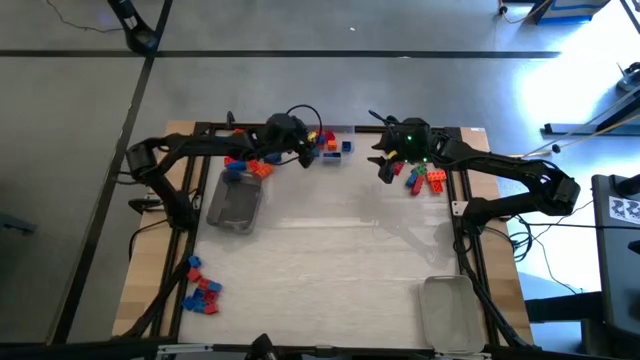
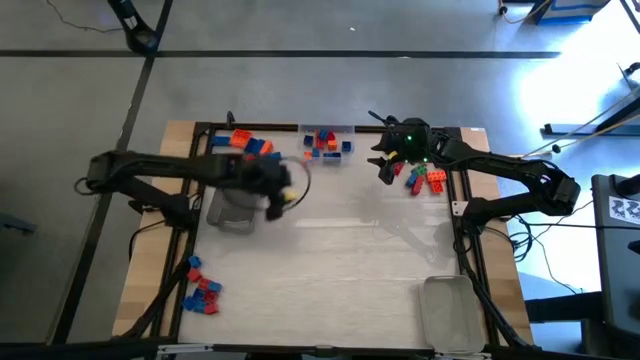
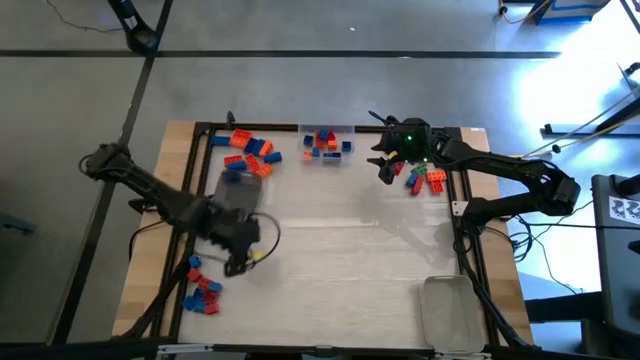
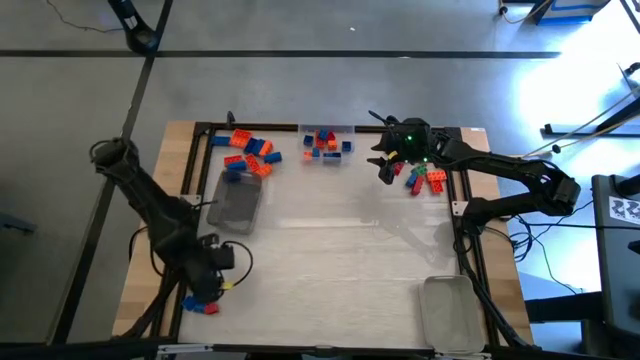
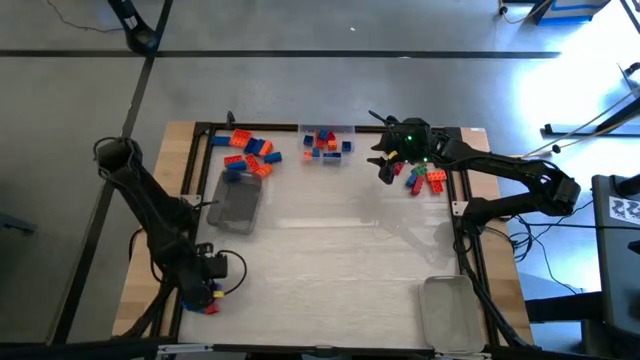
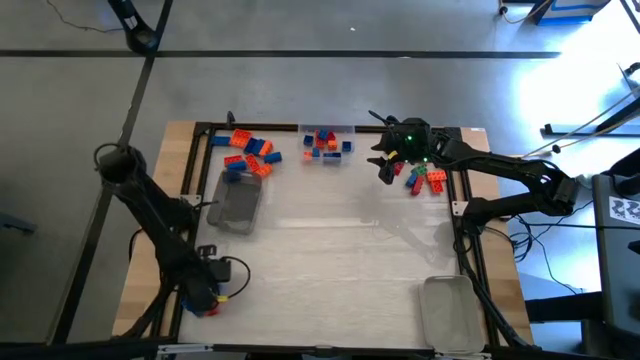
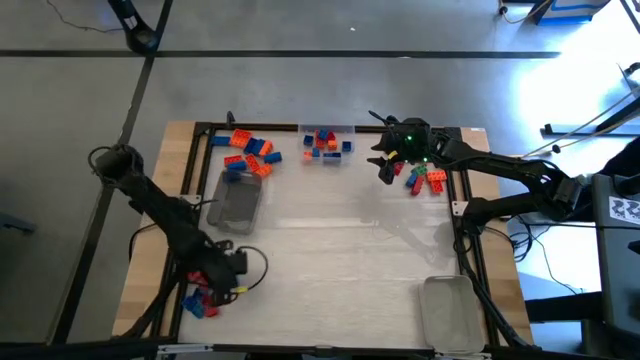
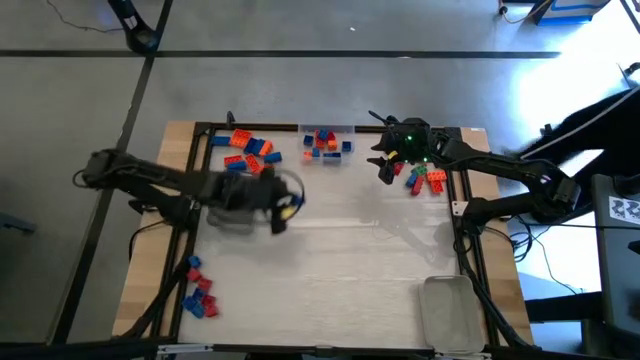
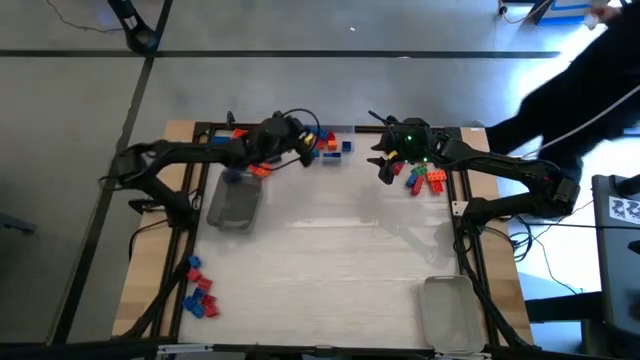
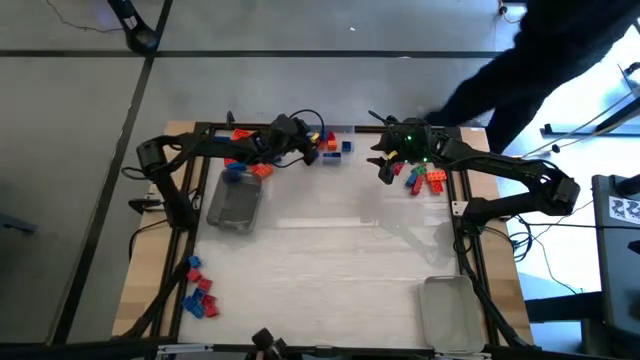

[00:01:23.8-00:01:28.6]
Task: Sort blocks by size
Put the blue 4 stud game piece into the transparent bin

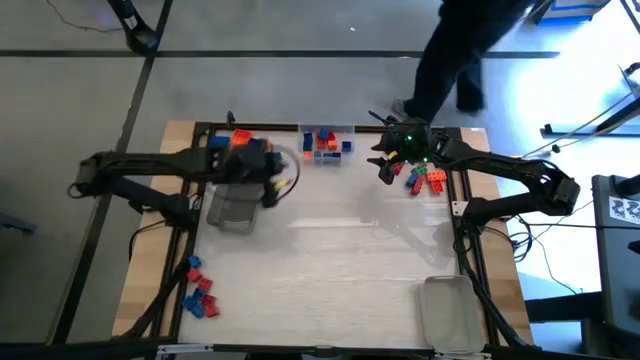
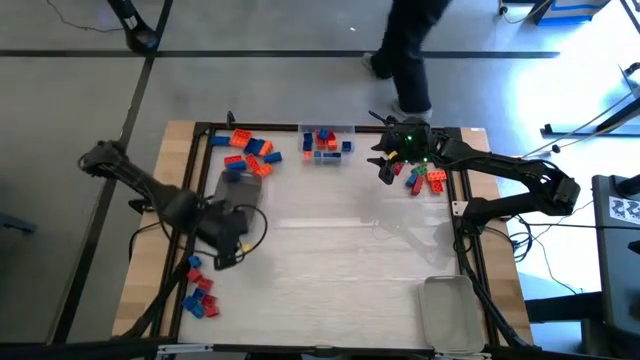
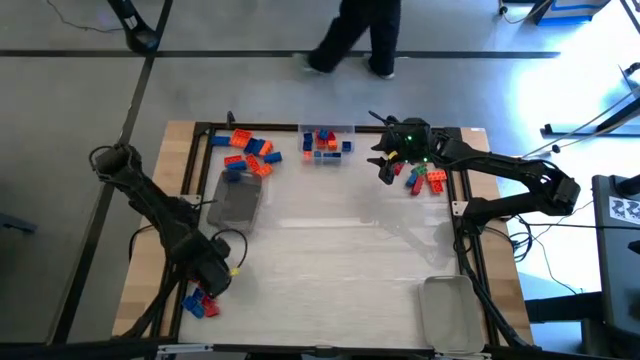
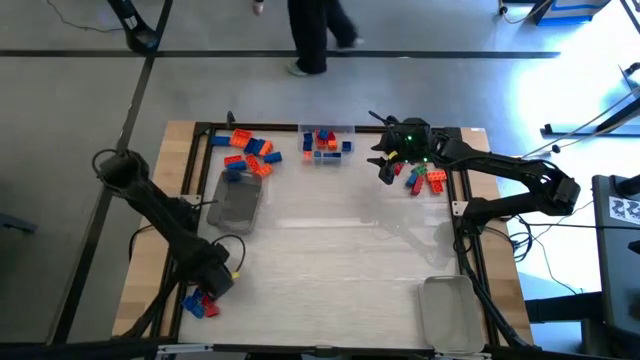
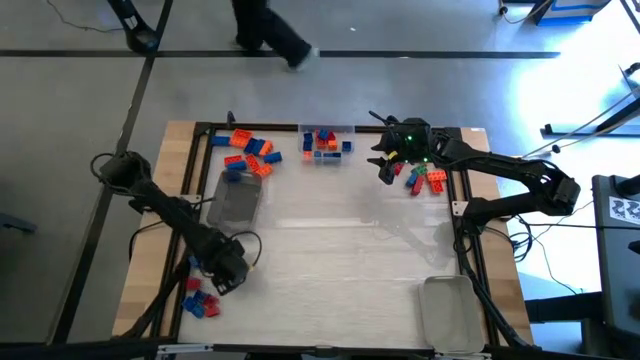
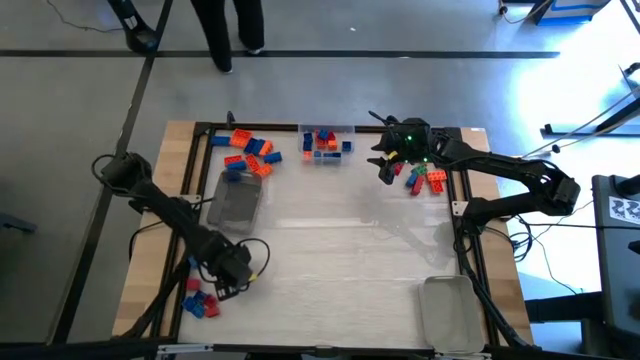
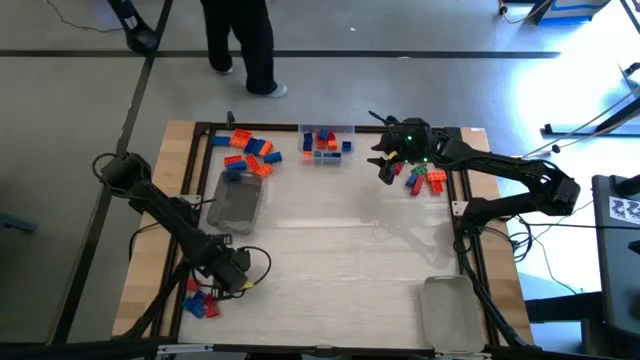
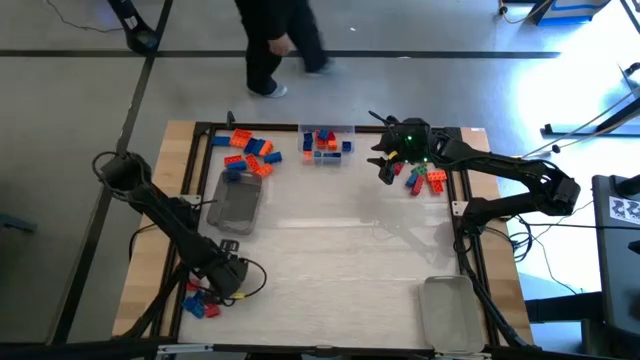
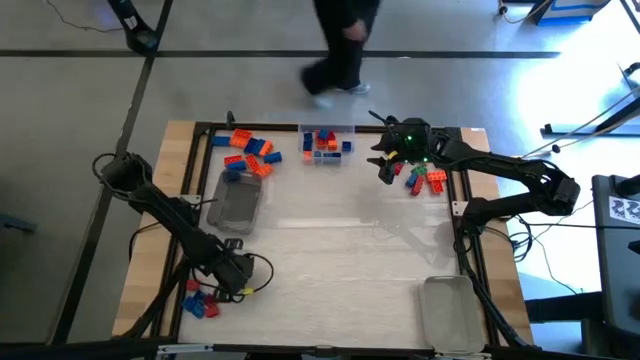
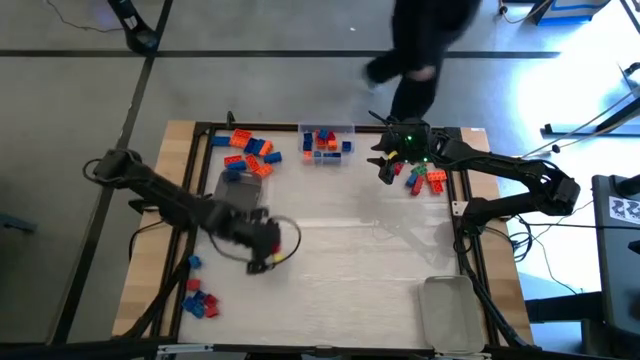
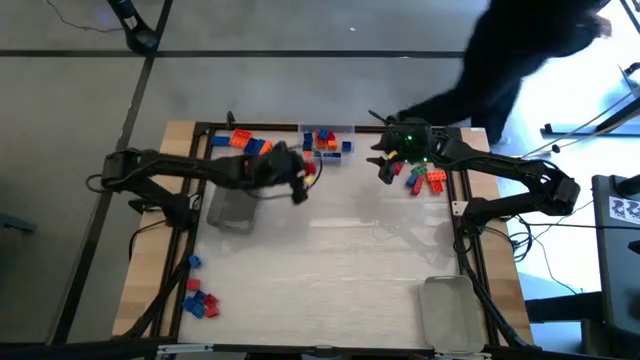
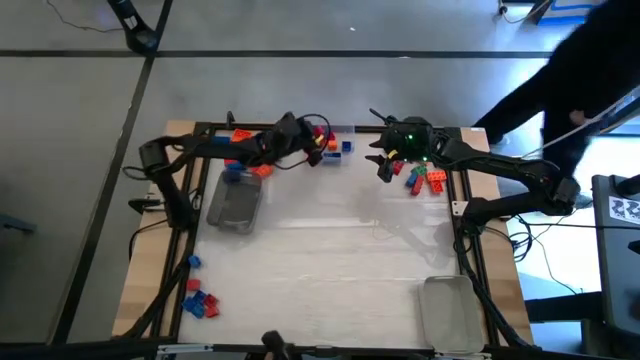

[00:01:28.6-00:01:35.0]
Put the red 4 stud game piece into the transparent bin

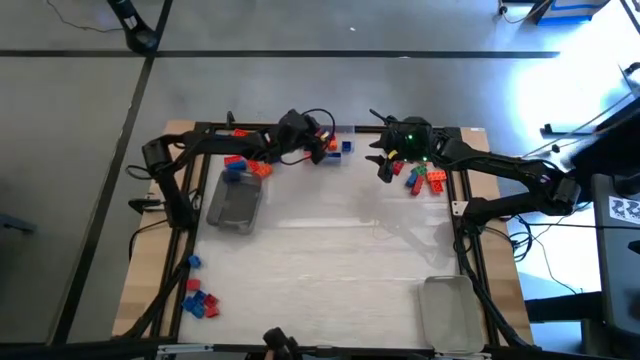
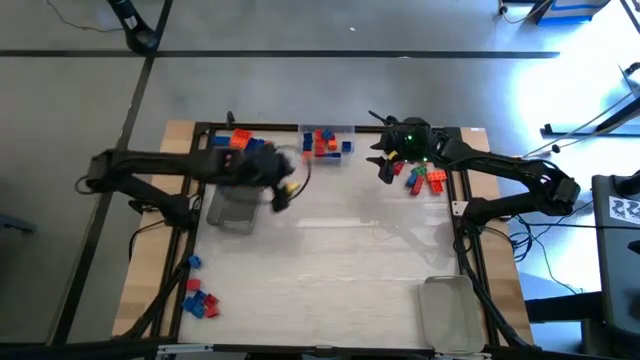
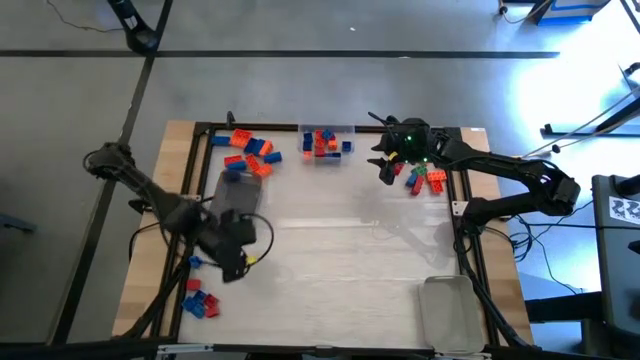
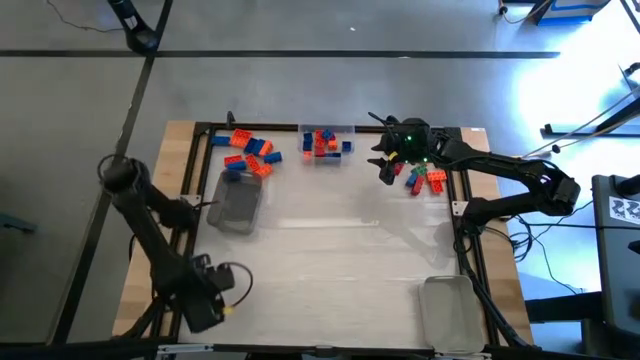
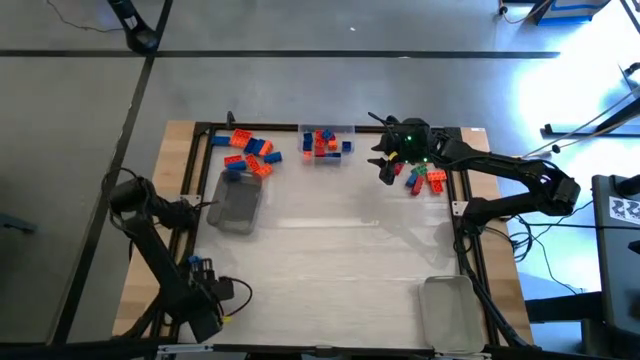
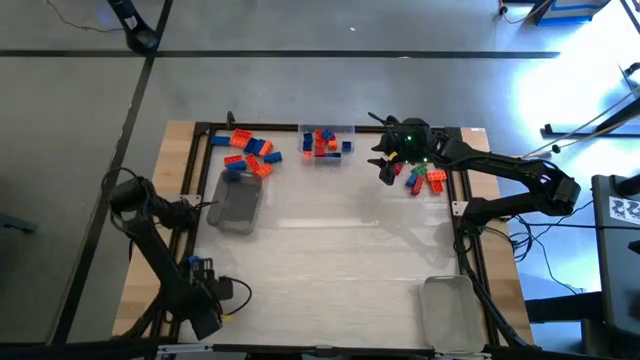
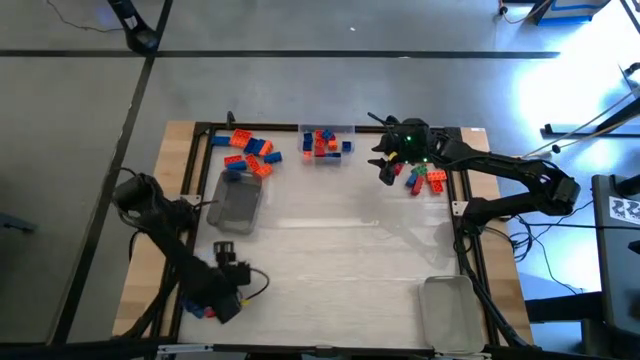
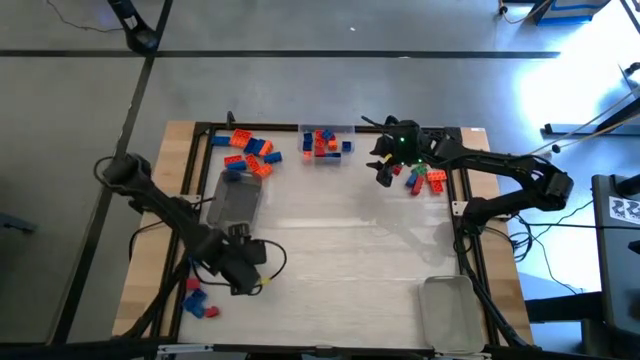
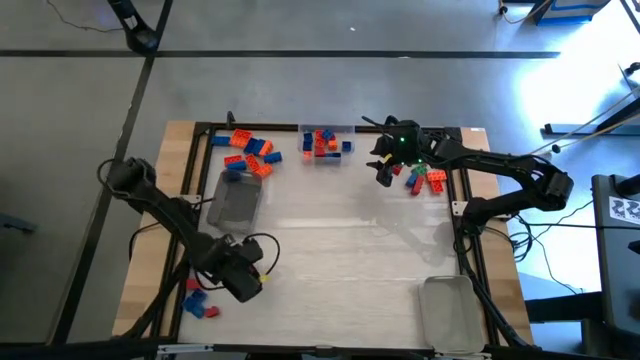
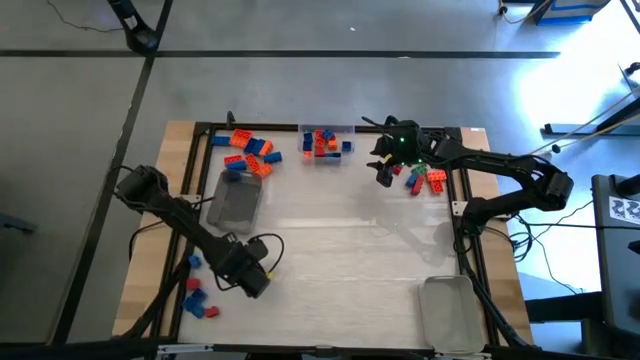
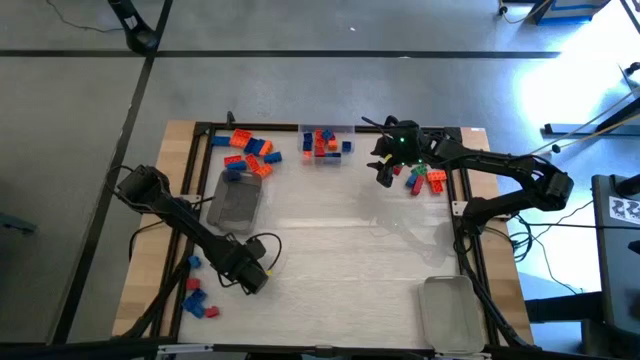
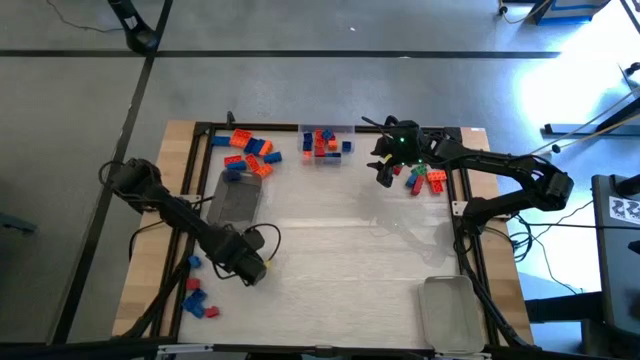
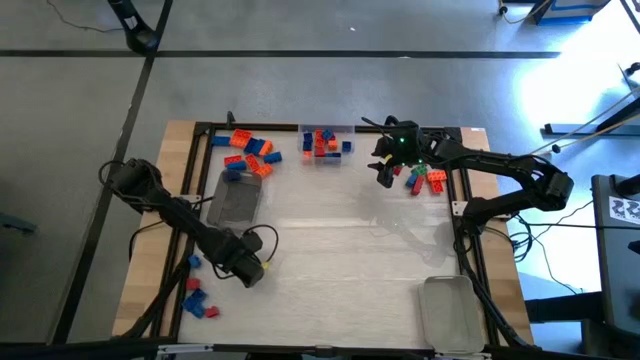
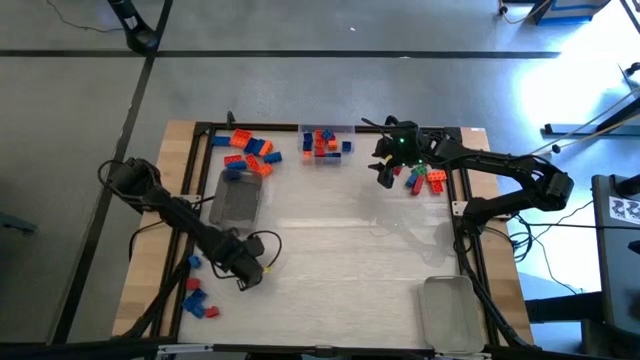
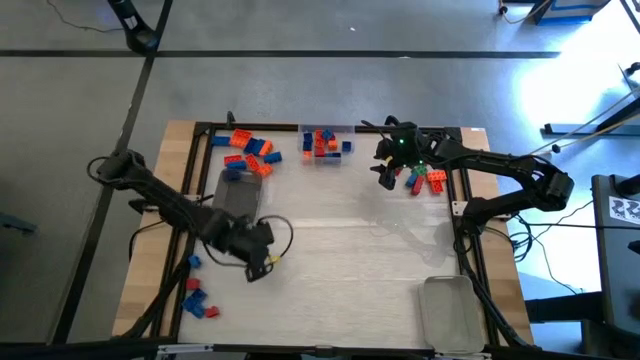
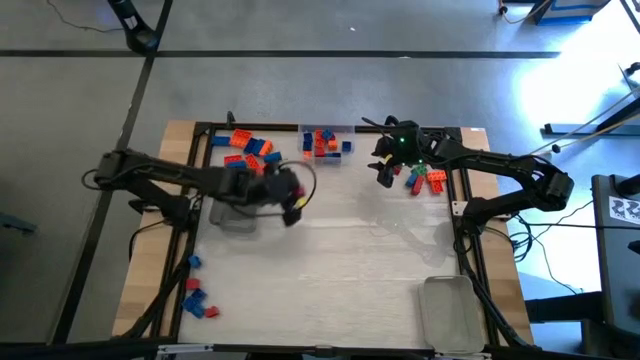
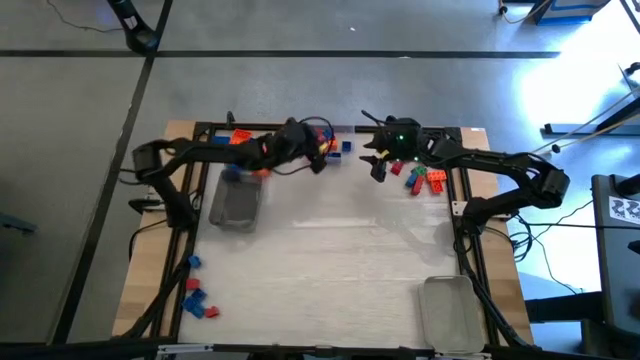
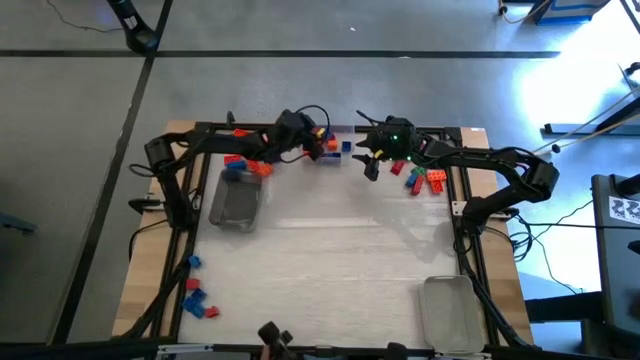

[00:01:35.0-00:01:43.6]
Put the red 4 stud game piece into the transparent bin

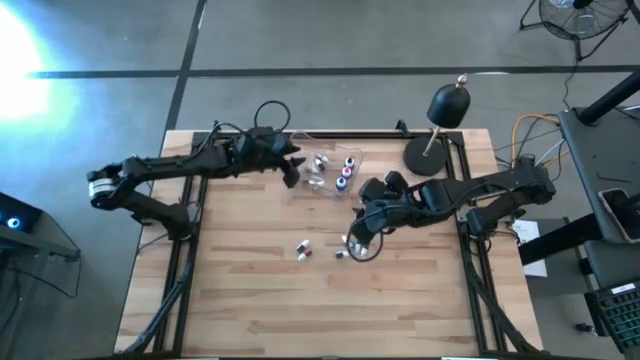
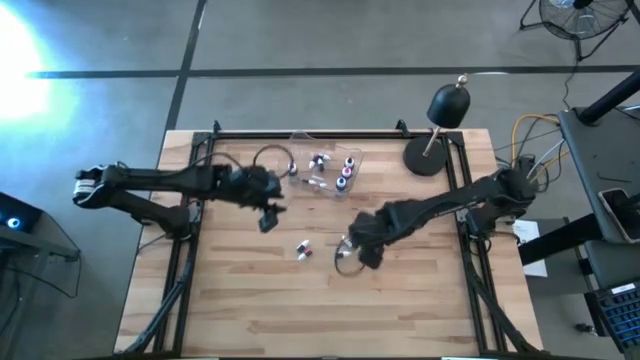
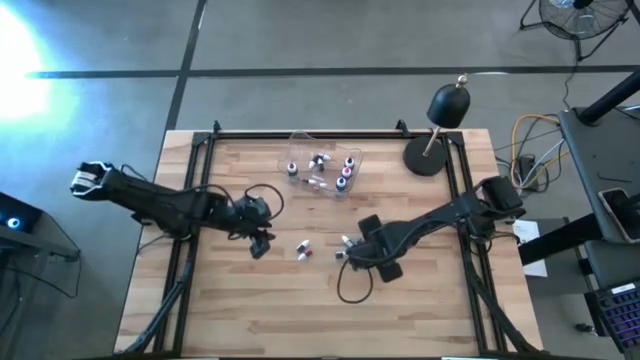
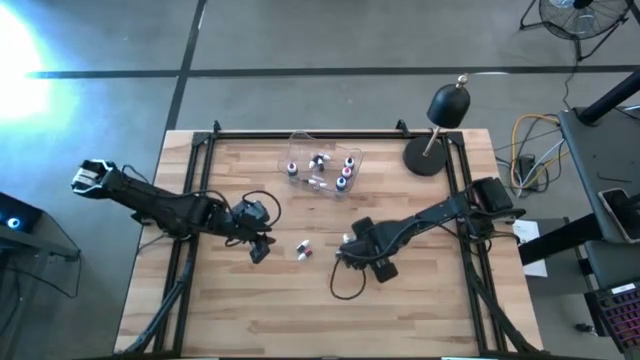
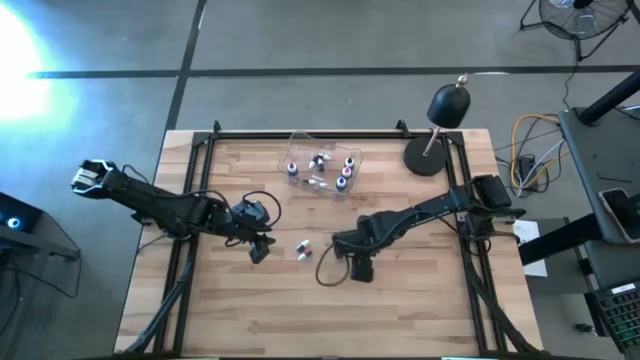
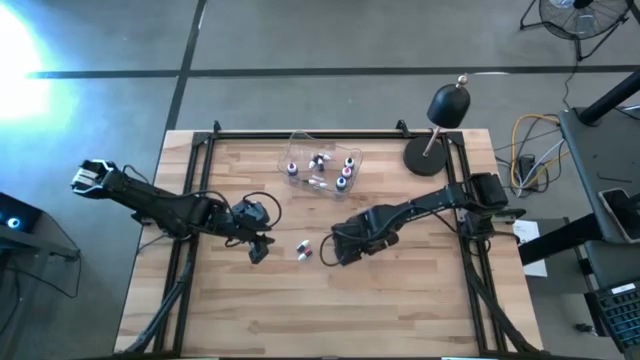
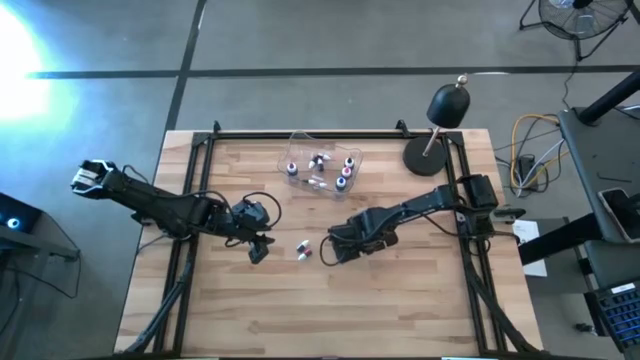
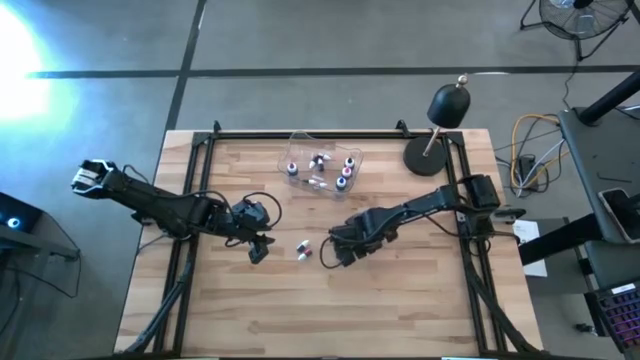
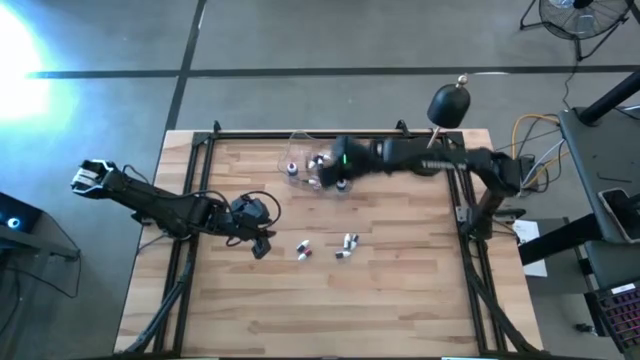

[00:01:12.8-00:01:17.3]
Task: Pick & Place food coloring
Put the small brown food coloring bottle into the transparent bin
